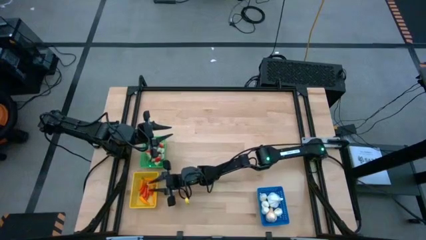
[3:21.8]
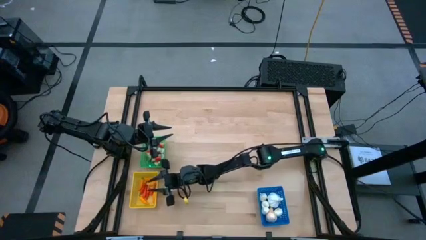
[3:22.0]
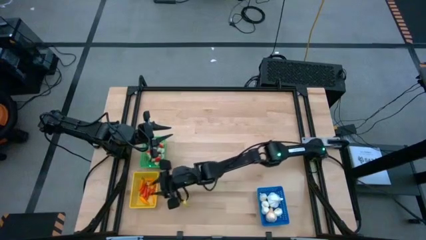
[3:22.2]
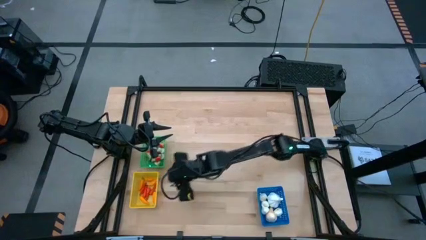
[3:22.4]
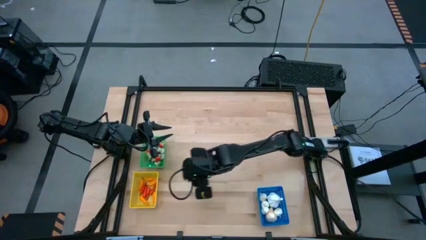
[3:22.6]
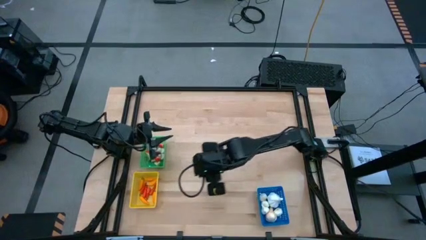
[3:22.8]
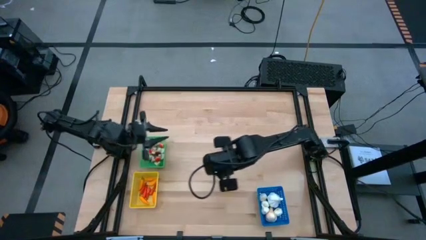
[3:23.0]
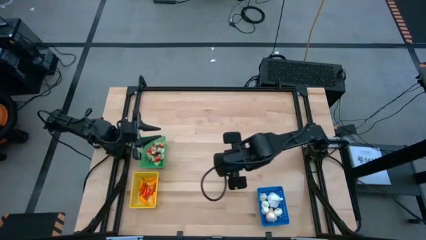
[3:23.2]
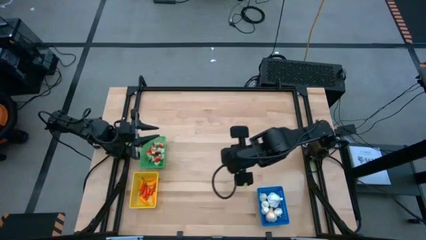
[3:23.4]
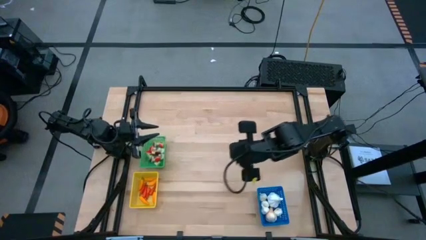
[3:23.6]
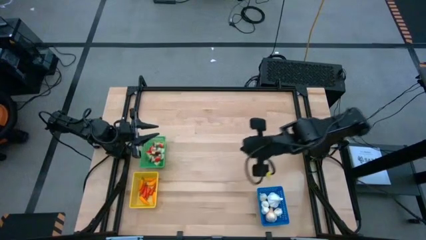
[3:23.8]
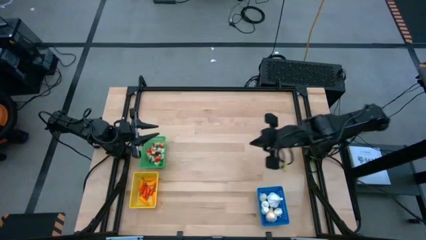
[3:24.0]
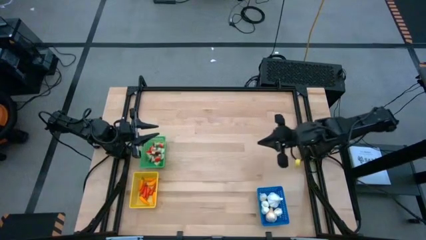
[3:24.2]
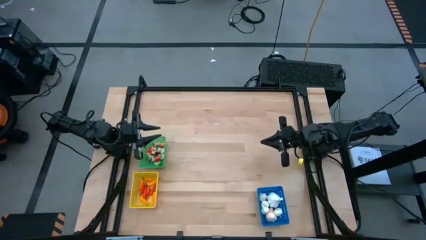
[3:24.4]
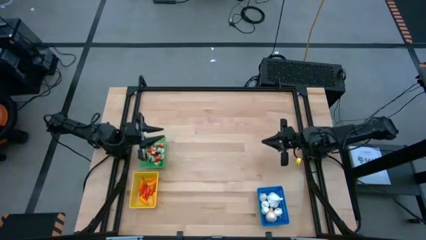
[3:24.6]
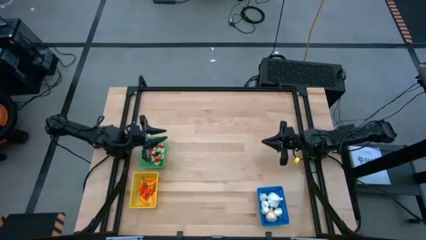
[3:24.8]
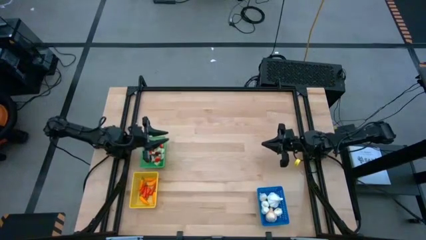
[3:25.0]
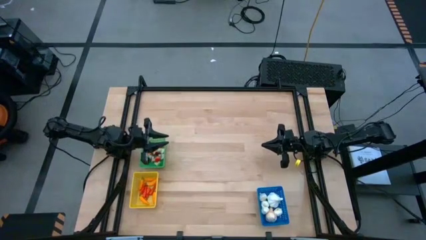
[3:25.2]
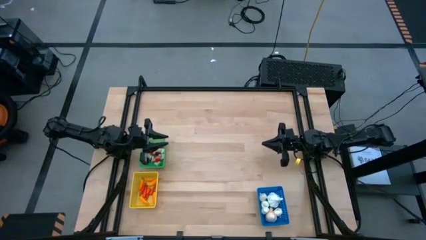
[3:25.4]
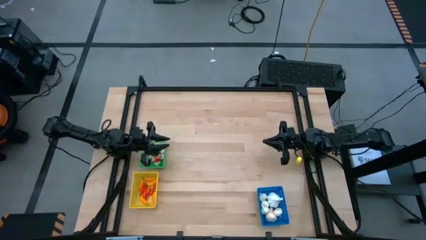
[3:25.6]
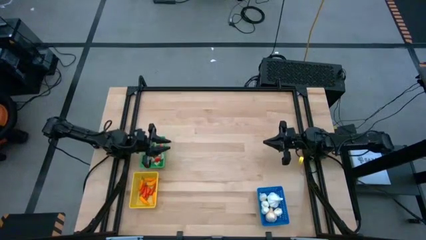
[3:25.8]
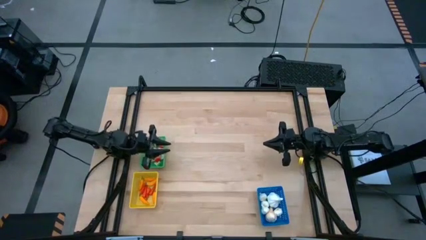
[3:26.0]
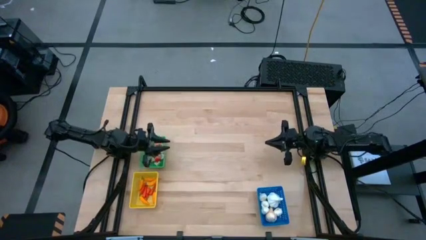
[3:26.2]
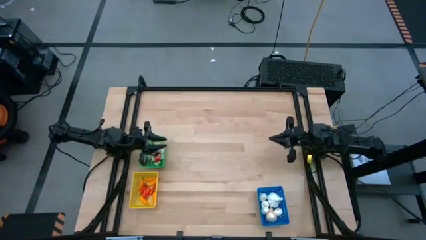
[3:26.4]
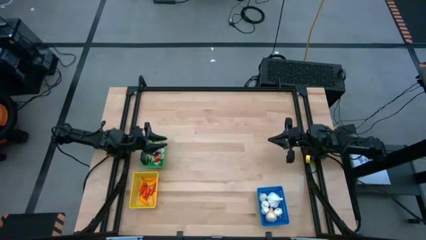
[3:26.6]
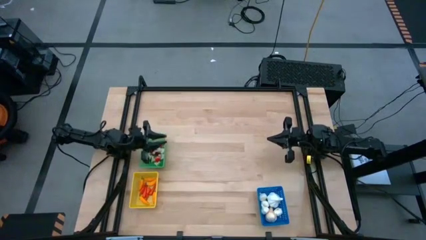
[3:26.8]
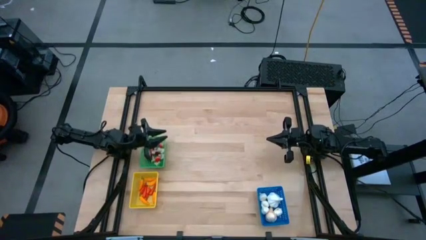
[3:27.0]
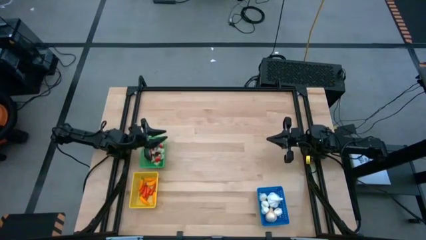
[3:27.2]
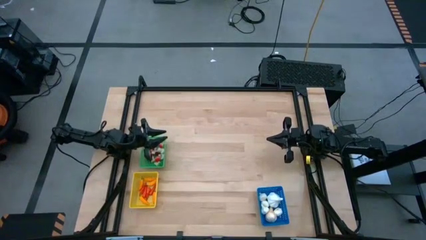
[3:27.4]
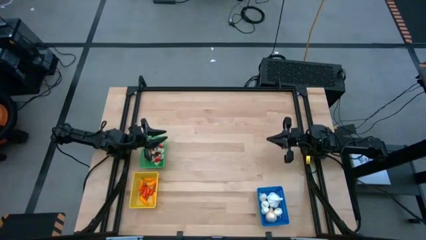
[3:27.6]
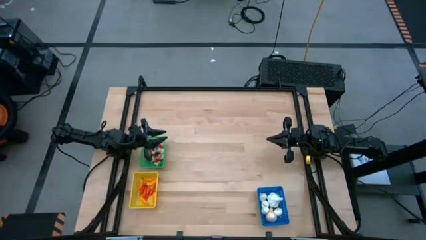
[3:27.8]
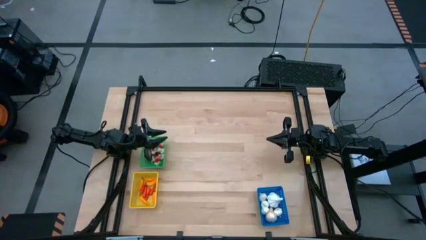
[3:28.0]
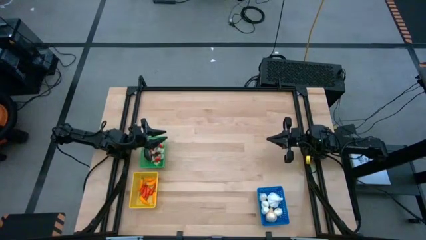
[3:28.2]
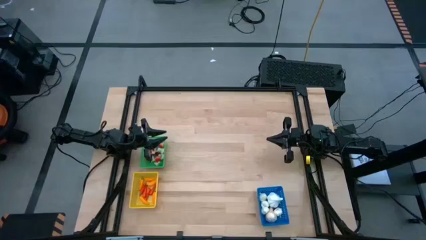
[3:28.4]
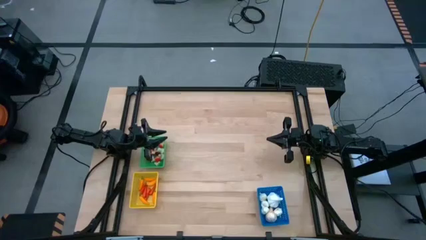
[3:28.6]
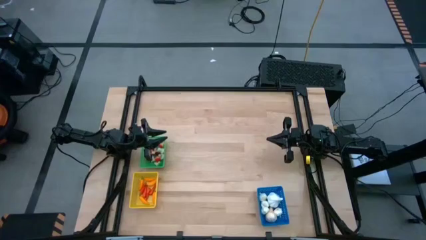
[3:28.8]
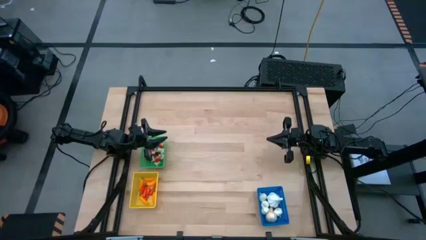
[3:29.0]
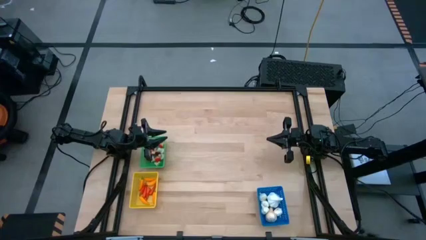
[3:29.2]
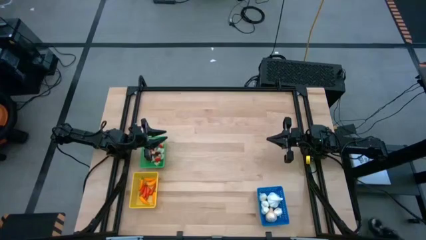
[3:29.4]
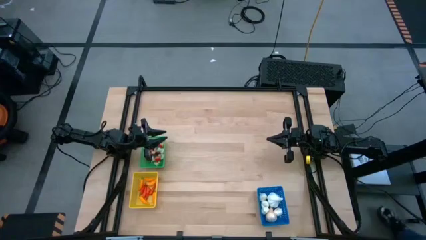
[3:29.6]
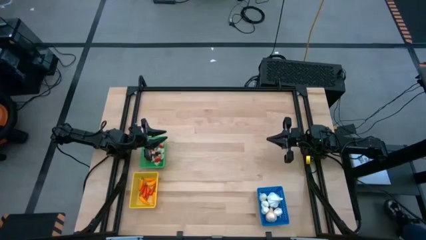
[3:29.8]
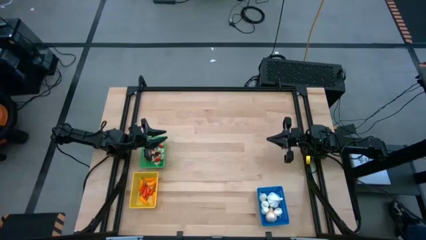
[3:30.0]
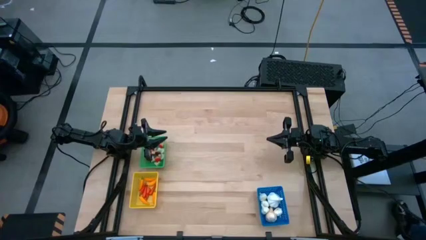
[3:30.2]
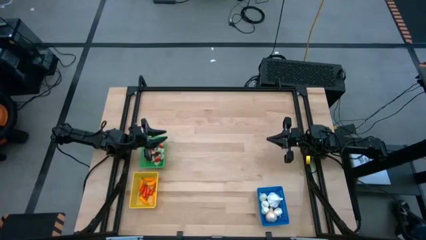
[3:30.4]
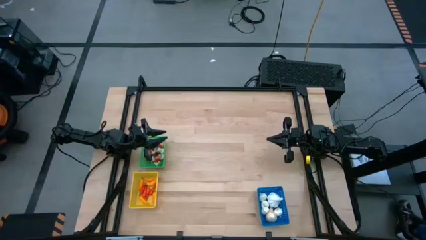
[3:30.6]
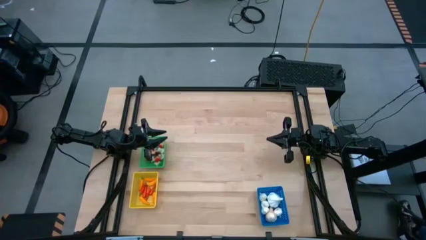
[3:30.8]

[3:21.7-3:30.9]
Task: Sort produce into baskets
Return to Home Position

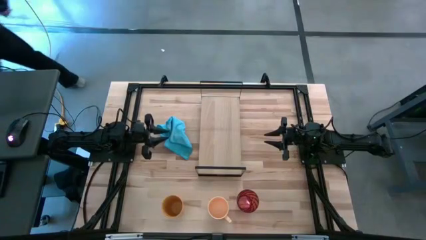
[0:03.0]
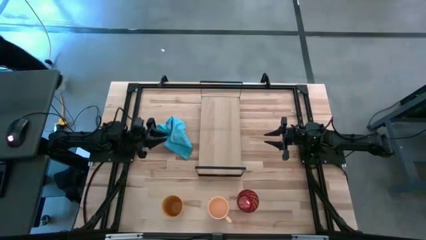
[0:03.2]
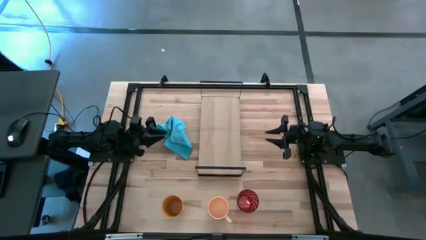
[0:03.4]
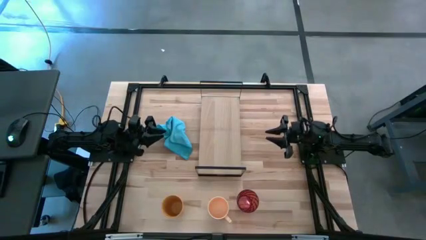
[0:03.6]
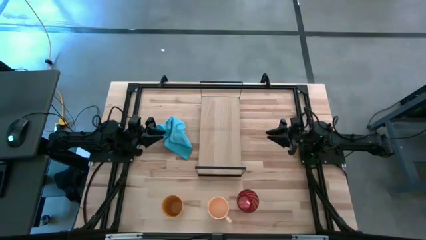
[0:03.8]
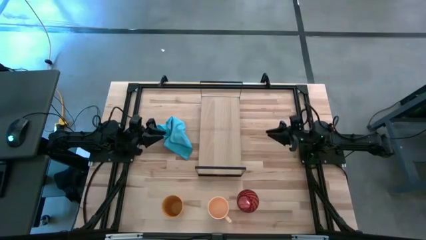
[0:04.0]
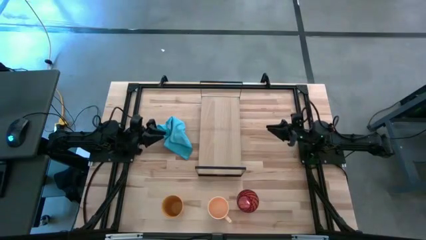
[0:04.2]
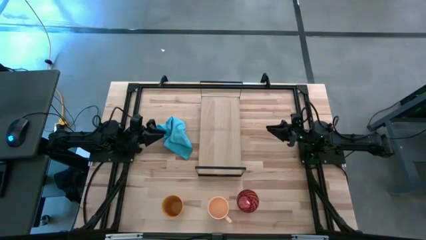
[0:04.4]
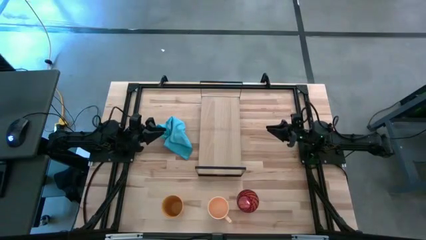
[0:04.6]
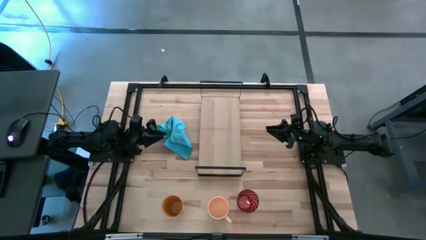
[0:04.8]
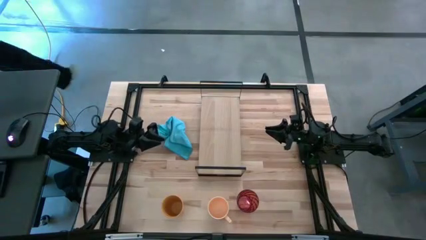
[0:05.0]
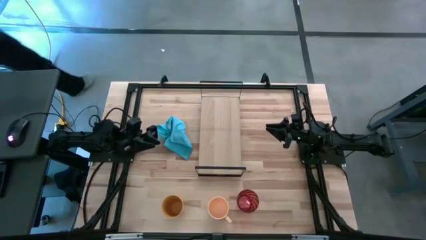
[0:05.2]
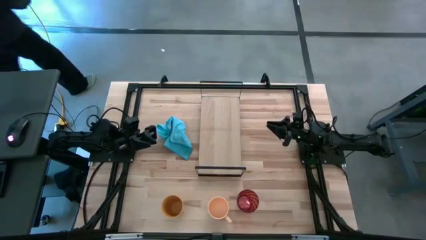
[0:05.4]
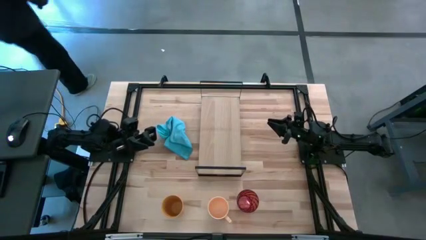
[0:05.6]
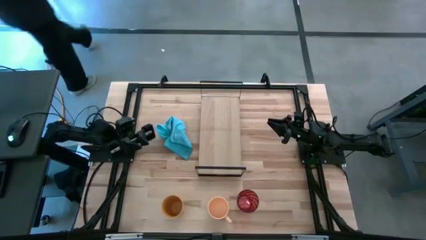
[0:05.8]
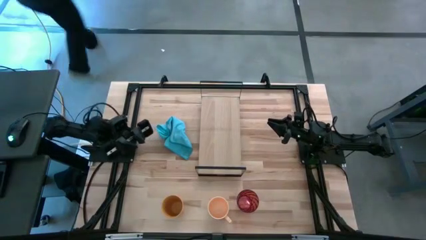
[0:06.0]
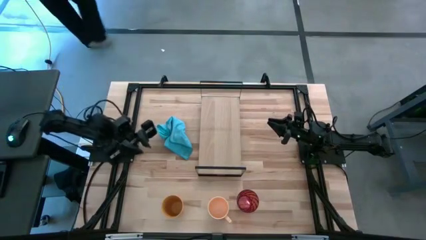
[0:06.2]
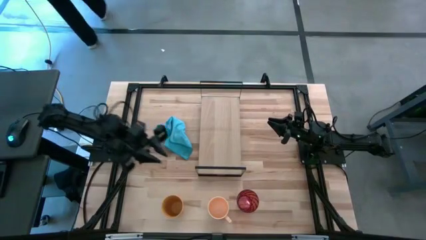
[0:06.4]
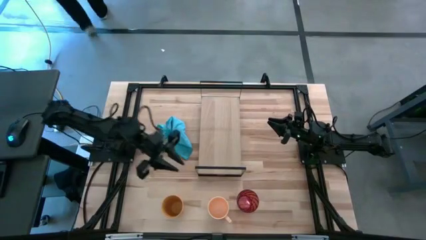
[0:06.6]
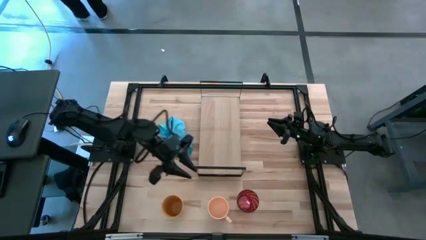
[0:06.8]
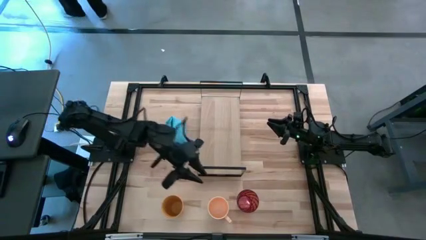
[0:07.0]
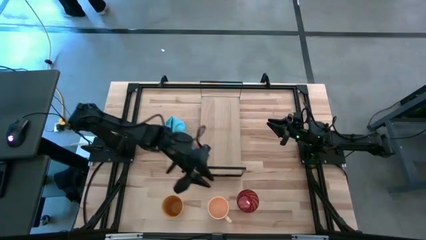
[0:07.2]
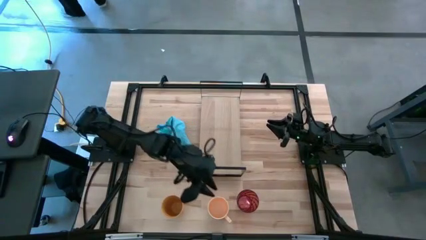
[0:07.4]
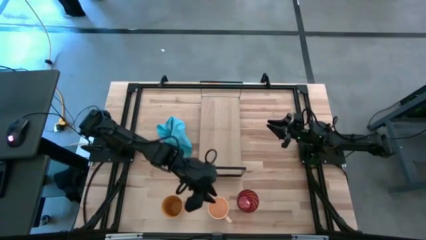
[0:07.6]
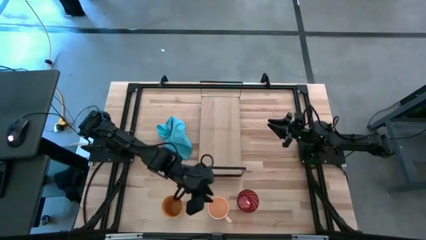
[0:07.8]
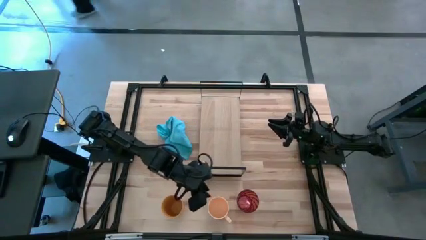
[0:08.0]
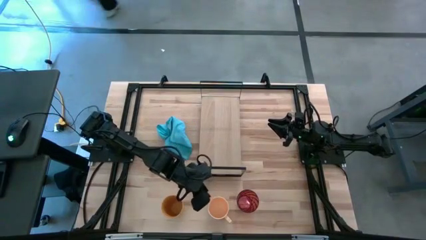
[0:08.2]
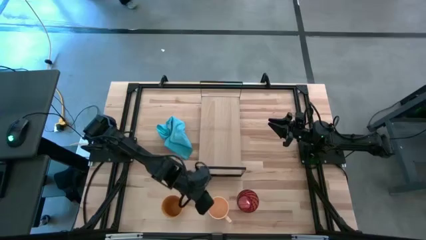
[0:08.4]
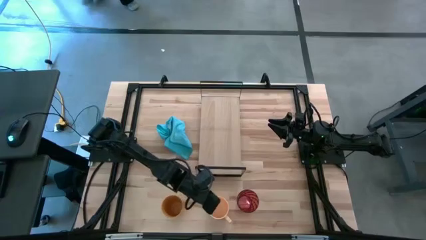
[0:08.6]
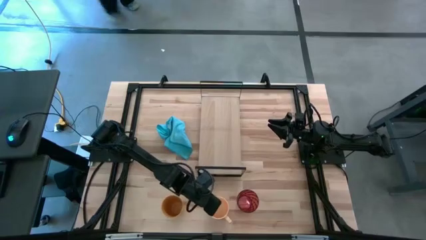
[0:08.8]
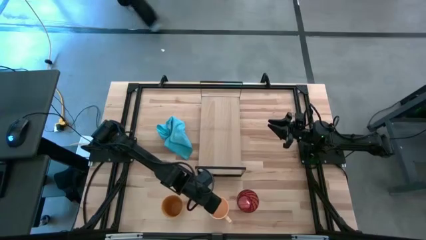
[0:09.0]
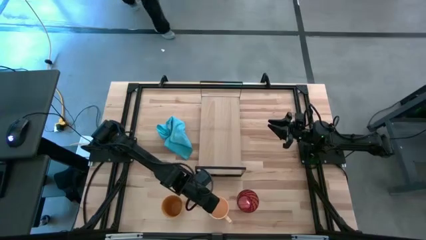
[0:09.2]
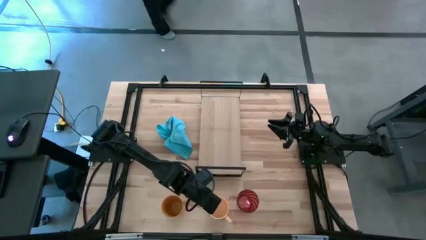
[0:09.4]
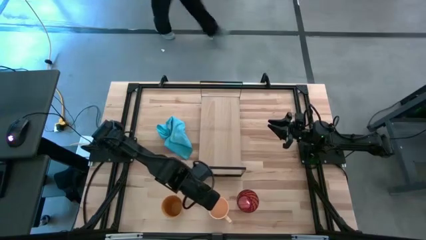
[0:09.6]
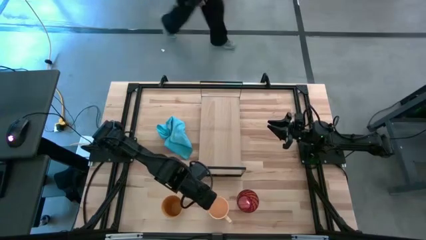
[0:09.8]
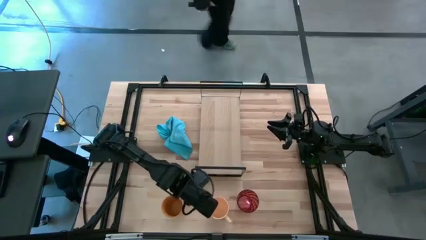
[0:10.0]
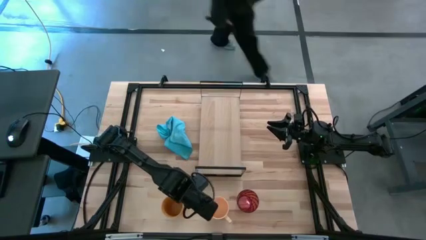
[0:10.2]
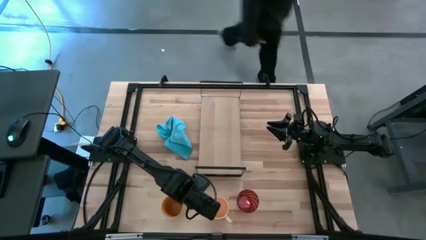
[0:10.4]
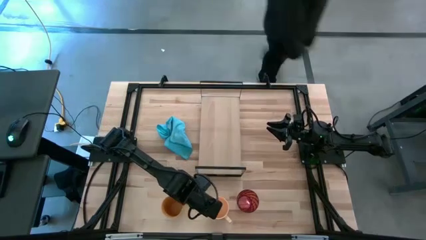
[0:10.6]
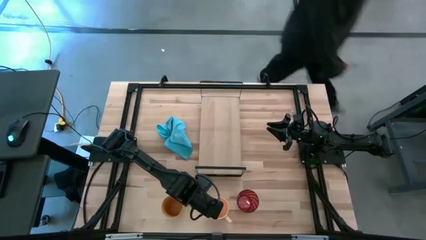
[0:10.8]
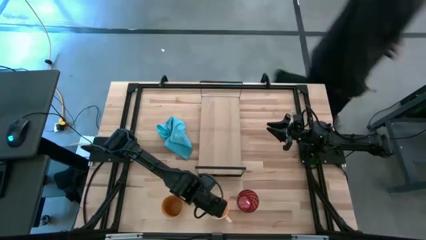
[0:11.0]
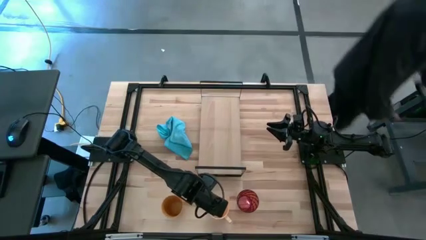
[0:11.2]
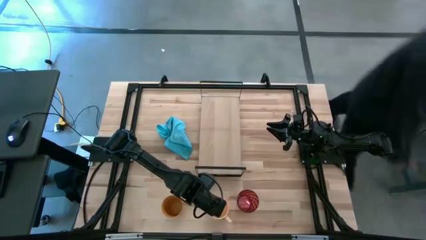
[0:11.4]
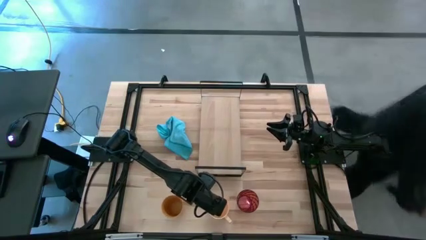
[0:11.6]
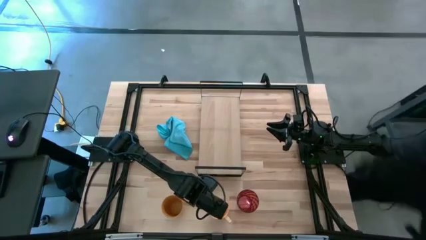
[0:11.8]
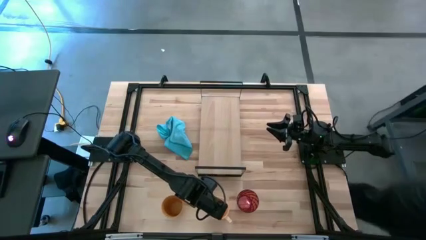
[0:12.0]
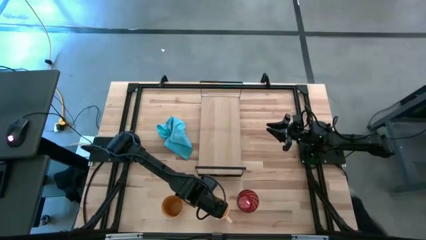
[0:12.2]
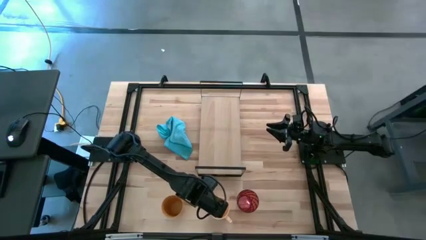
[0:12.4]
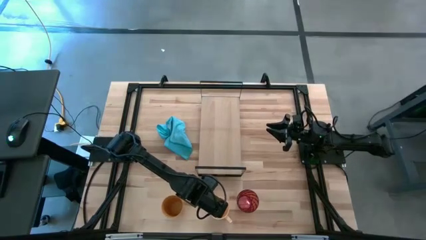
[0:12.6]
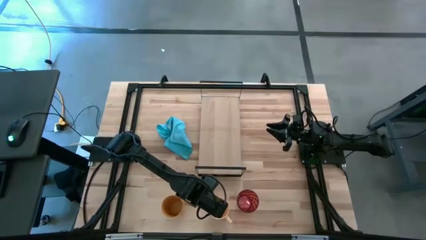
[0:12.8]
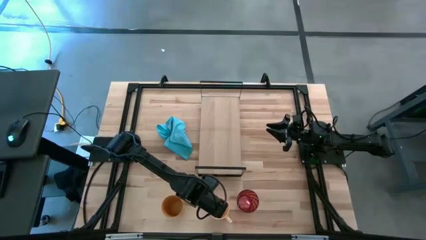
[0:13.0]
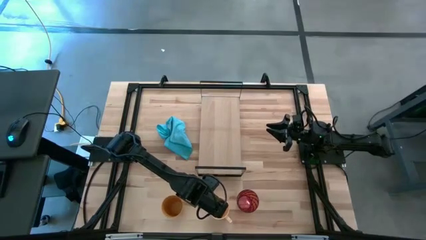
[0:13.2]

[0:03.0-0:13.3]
Task: Stack small to large cups/mugs on shelf
Put the light orange mug on the shelf
